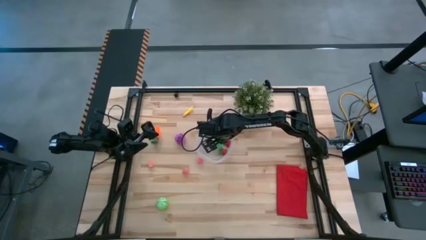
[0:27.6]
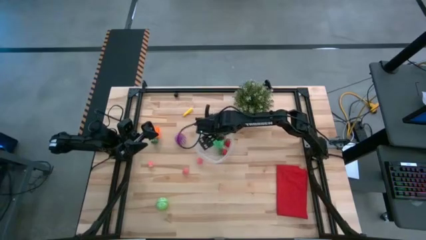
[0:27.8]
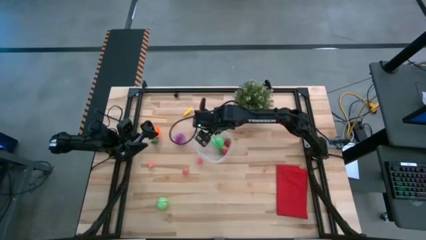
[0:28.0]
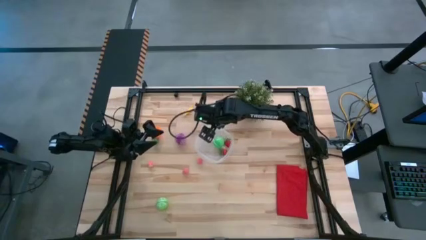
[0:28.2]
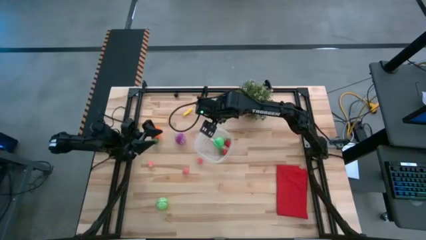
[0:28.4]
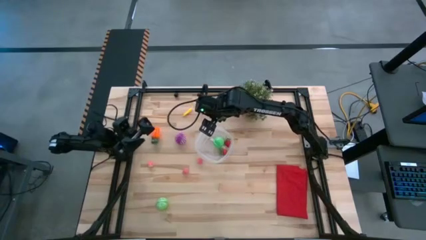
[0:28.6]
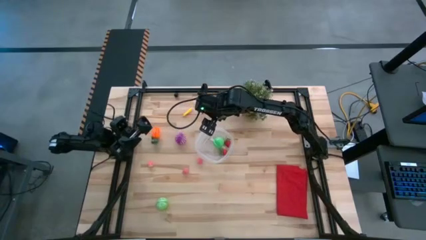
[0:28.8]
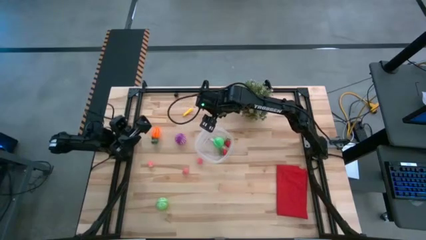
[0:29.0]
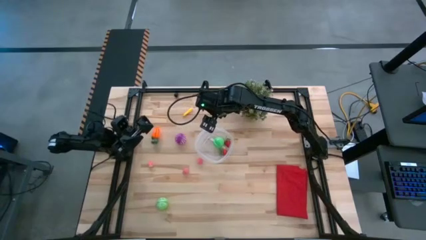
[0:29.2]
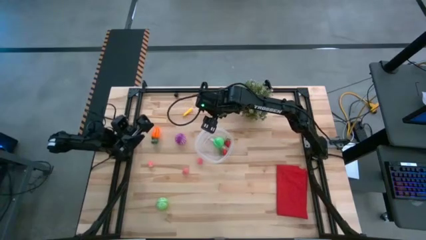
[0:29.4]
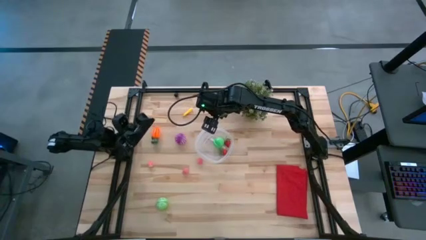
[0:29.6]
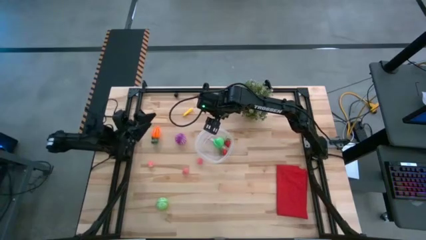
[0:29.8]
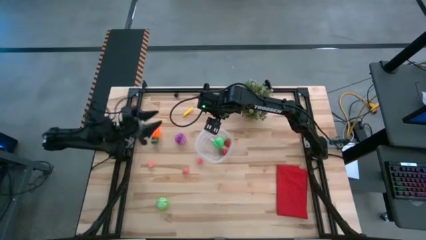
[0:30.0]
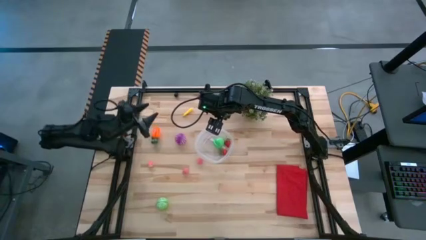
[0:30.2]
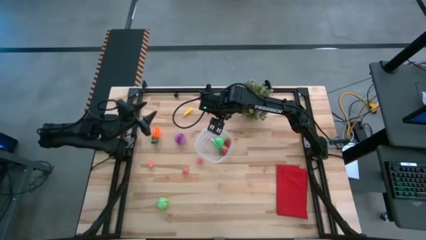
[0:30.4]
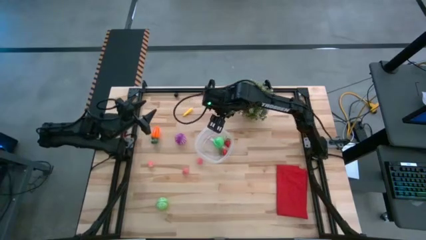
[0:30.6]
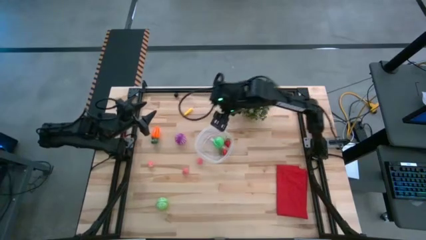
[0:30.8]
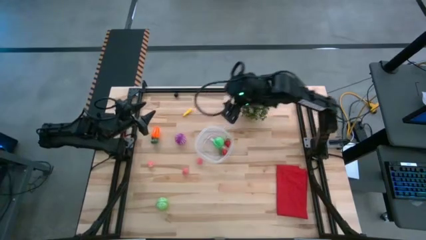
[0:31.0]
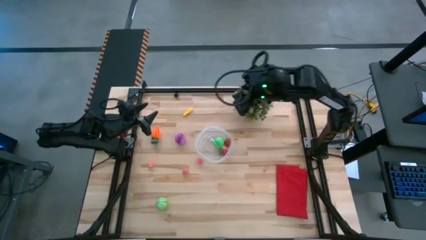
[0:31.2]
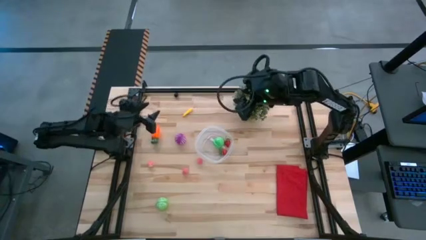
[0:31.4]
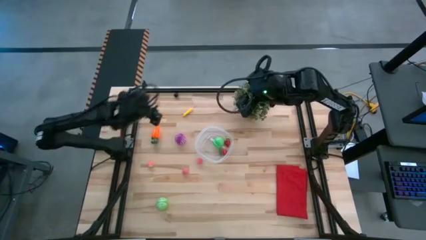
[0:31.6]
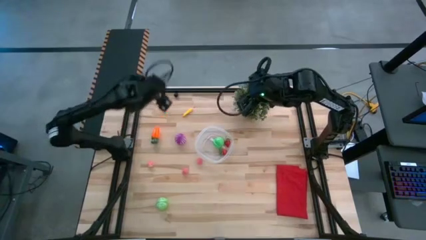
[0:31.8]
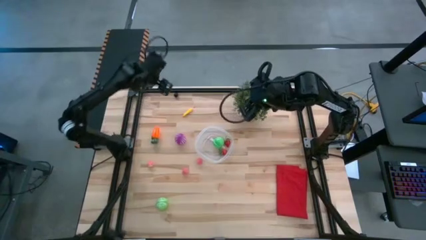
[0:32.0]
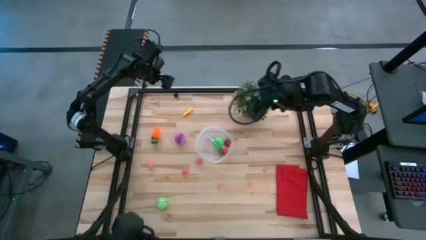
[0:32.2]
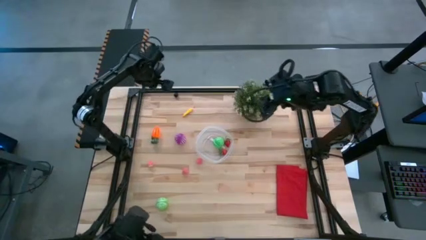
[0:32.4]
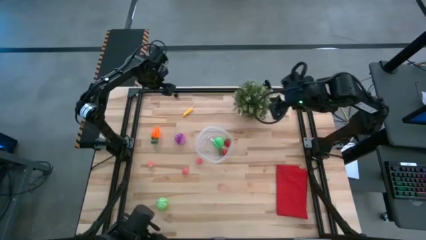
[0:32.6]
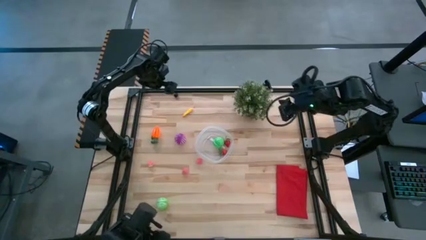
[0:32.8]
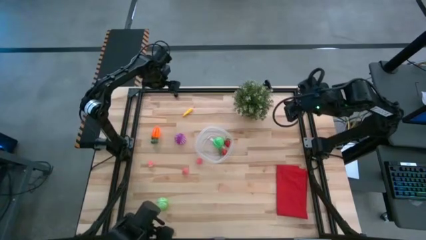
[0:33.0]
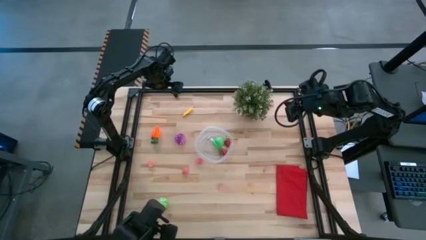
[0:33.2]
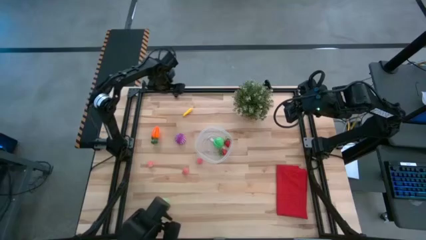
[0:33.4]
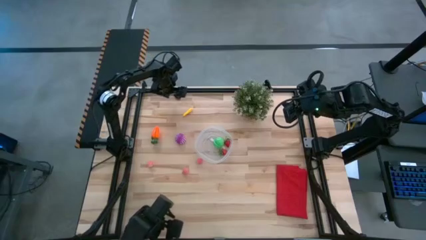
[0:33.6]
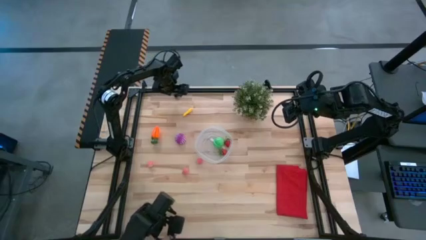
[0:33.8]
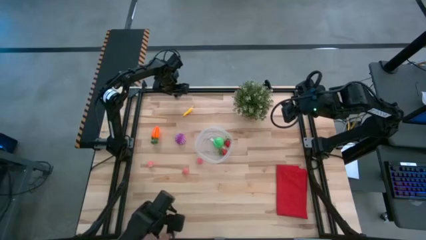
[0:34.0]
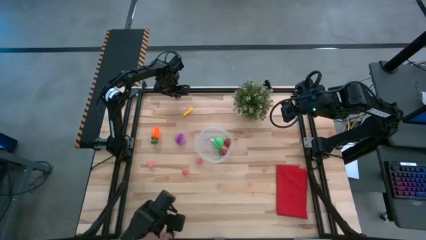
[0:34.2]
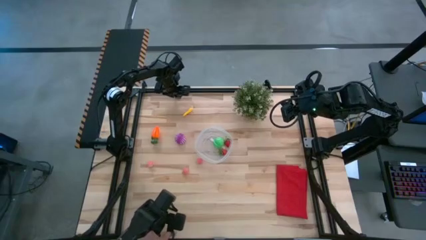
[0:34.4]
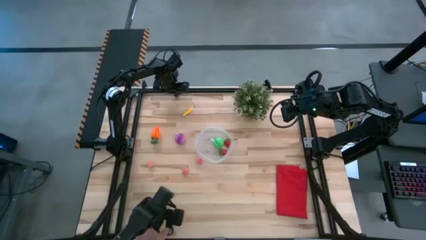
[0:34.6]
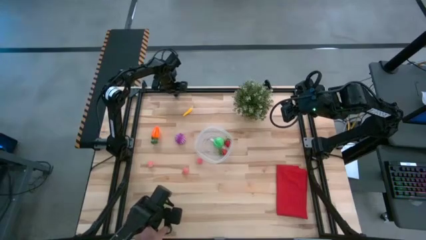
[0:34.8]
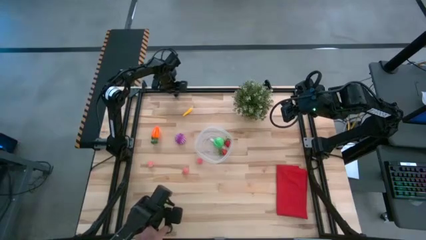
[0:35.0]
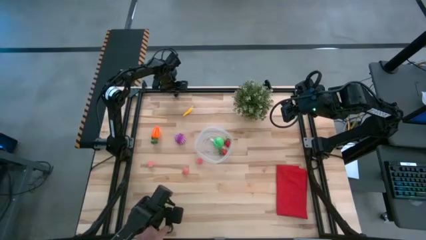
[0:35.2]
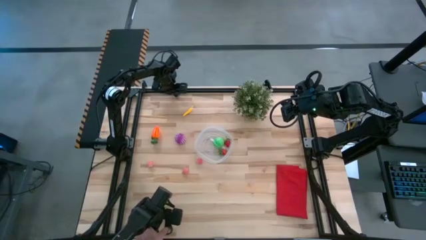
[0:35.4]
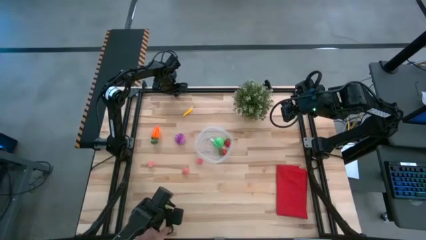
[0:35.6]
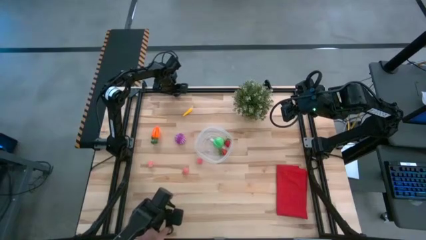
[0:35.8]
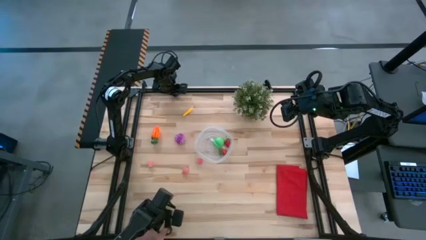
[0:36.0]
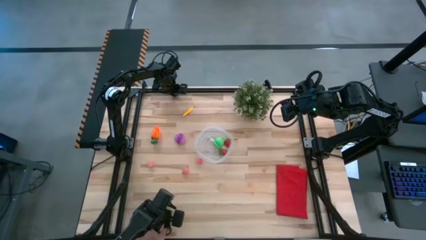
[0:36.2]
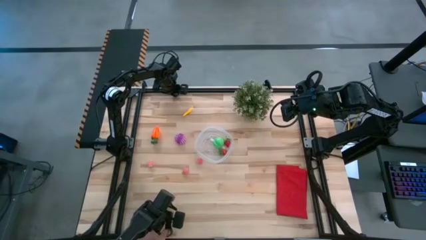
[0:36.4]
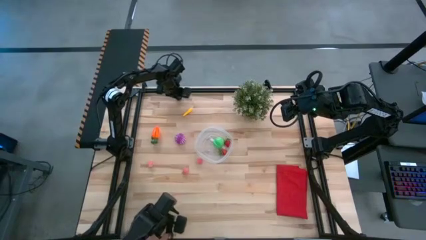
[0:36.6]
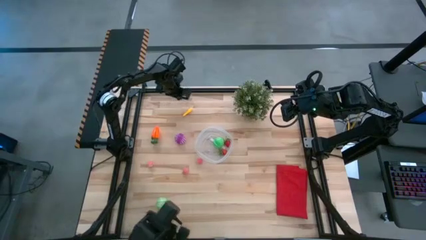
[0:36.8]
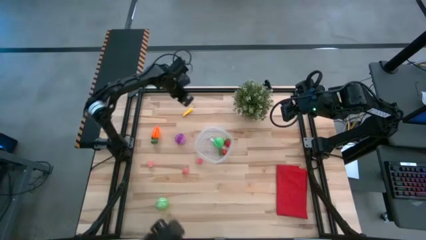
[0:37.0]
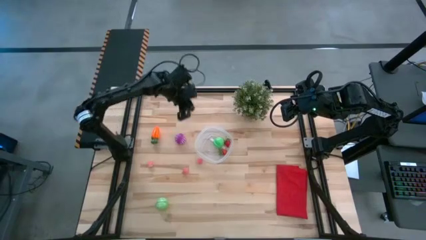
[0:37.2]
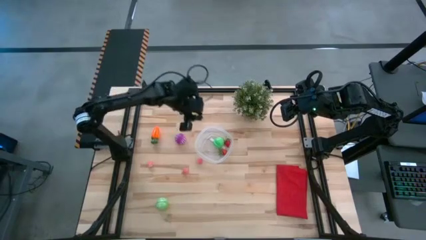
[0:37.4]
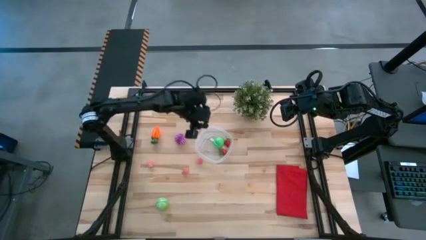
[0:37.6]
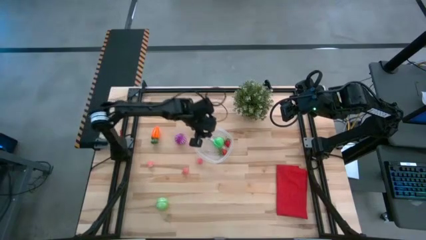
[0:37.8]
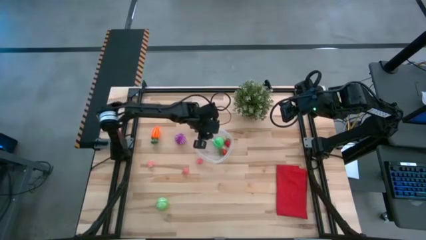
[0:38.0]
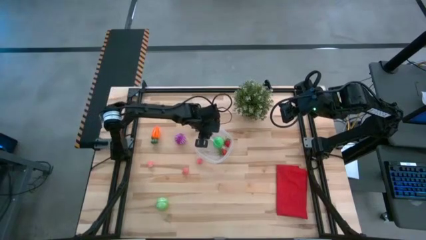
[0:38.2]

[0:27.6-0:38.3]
Task: Pick and placing Produce into tupperware
Put the blackberry into the transparent bin

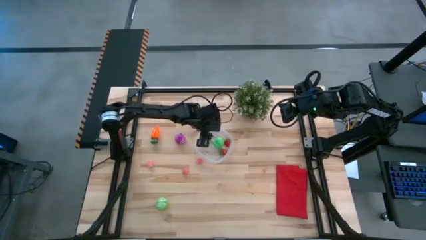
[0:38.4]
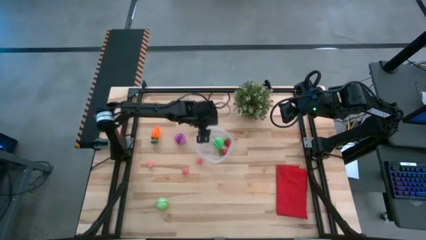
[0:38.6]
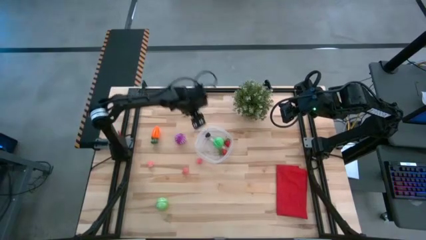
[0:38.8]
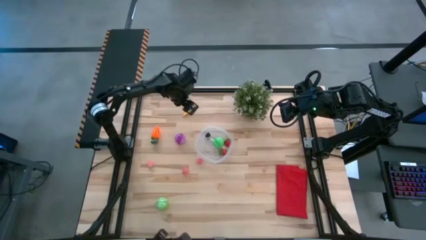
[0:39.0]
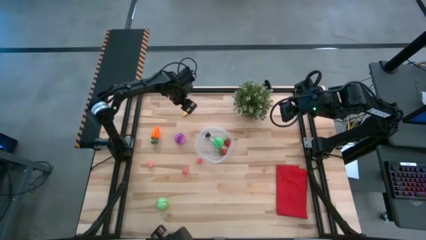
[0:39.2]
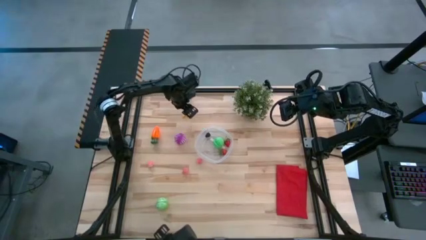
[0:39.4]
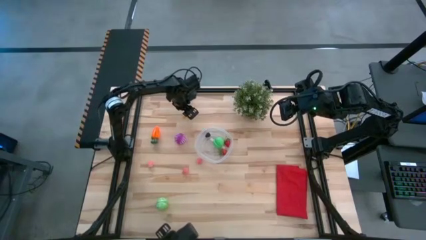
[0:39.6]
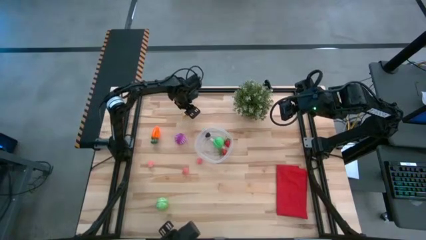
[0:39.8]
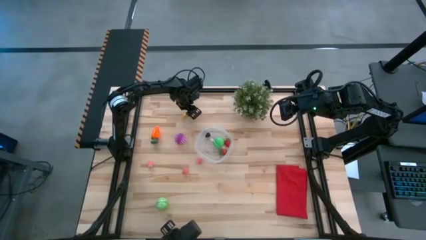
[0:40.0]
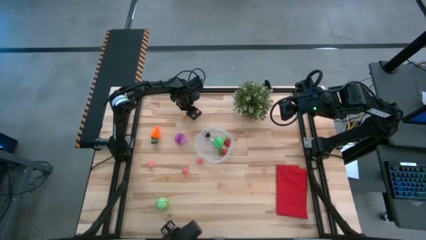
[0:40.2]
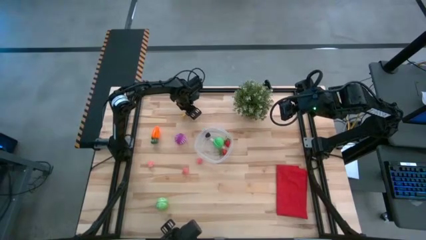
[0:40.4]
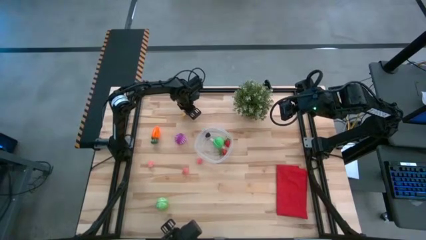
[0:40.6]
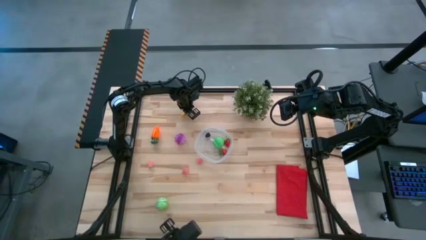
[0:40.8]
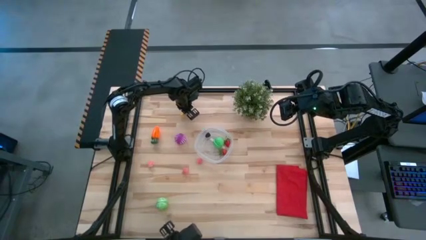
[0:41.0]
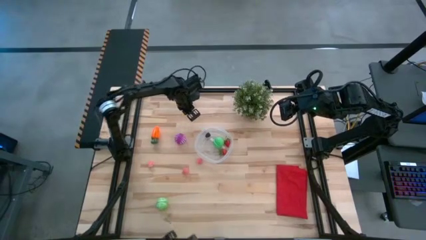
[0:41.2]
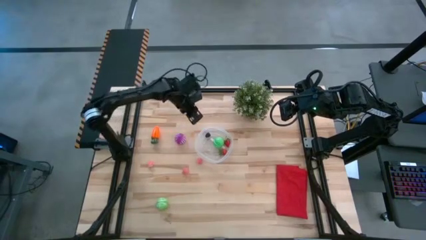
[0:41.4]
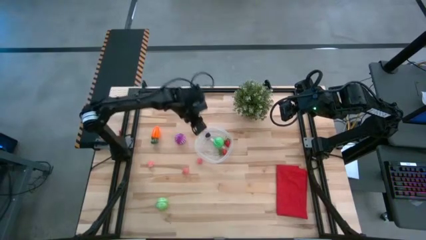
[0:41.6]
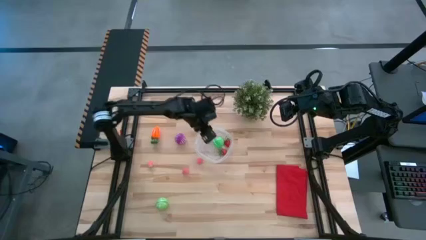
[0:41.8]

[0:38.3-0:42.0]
Put the yellow corn into the transparent bin
